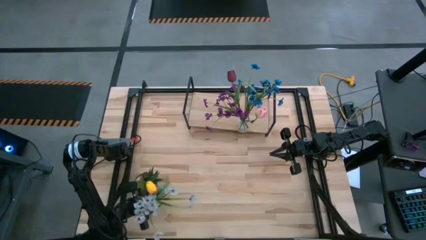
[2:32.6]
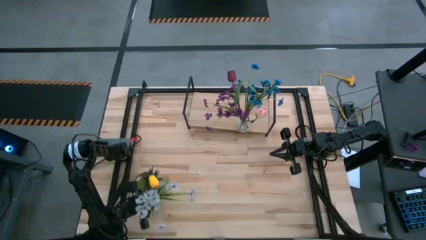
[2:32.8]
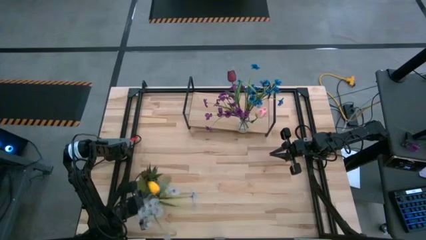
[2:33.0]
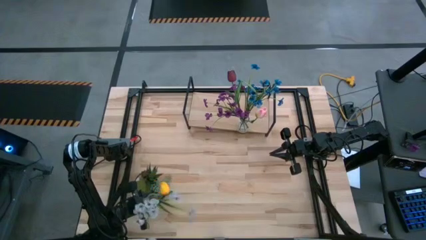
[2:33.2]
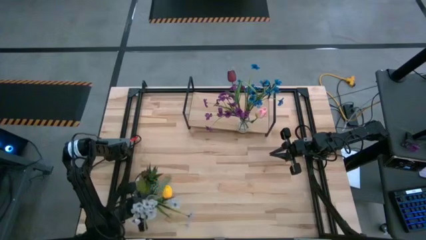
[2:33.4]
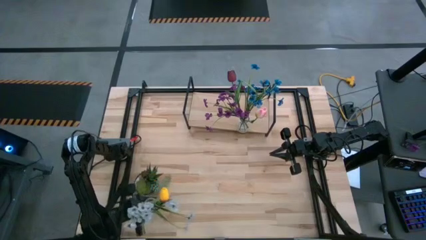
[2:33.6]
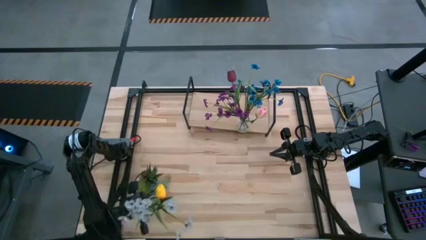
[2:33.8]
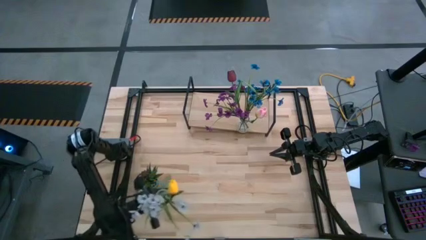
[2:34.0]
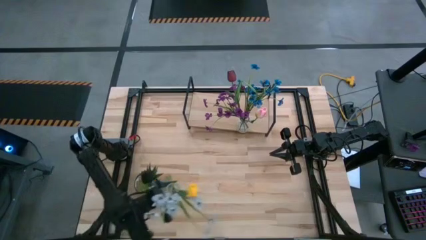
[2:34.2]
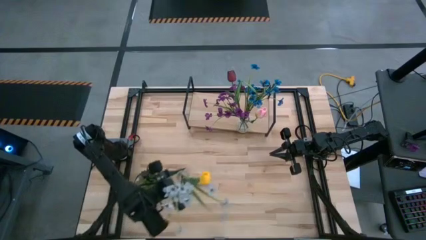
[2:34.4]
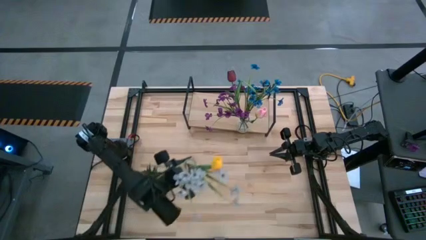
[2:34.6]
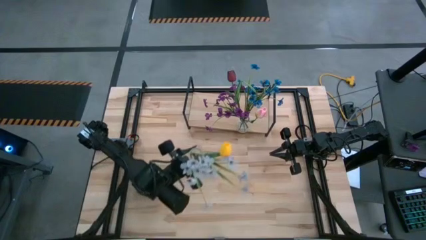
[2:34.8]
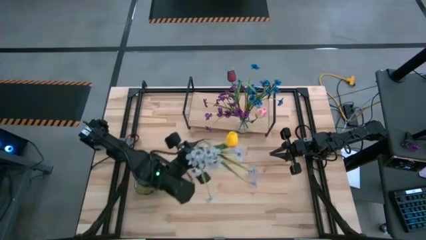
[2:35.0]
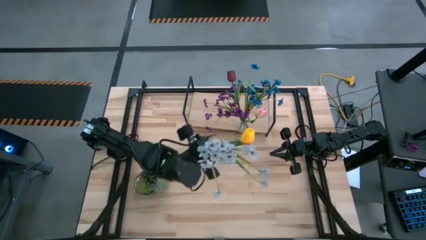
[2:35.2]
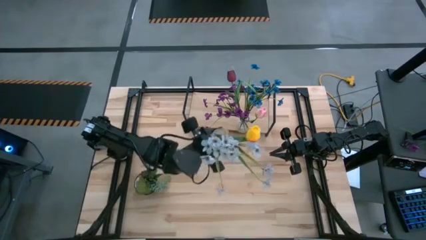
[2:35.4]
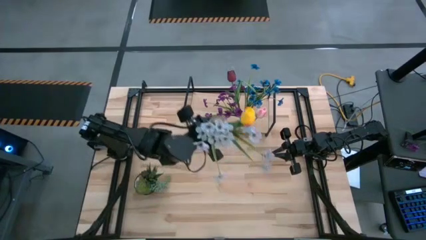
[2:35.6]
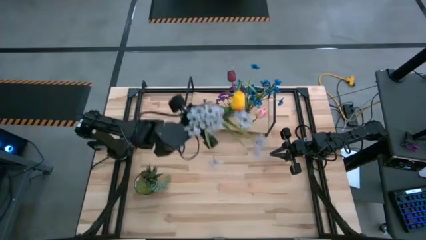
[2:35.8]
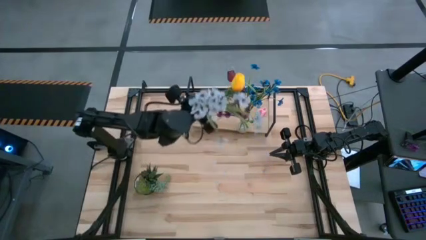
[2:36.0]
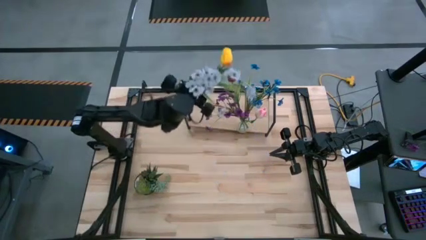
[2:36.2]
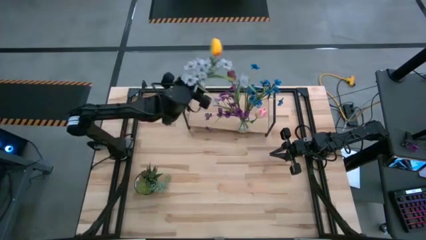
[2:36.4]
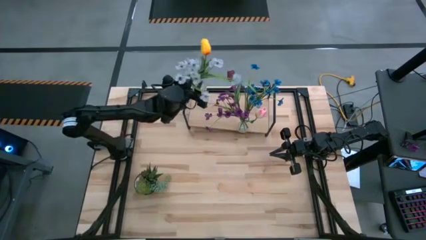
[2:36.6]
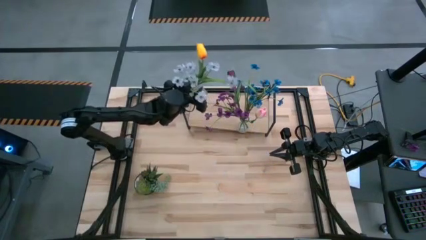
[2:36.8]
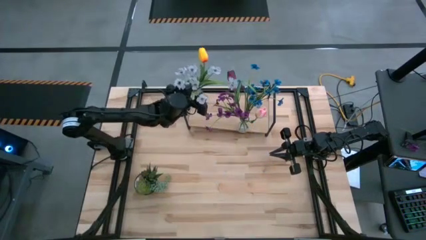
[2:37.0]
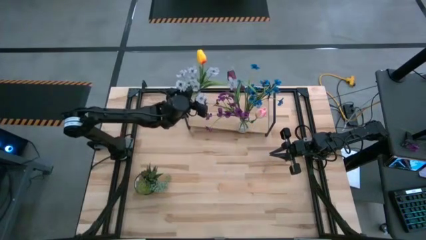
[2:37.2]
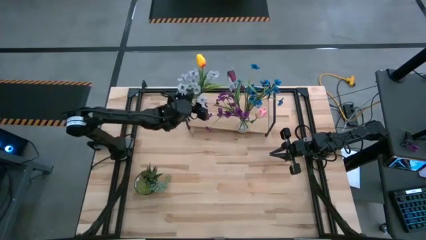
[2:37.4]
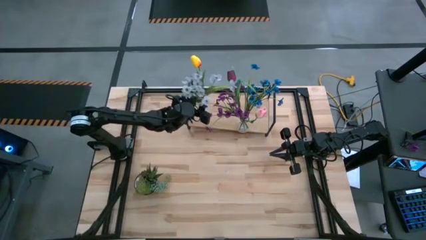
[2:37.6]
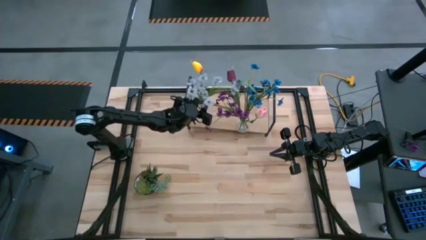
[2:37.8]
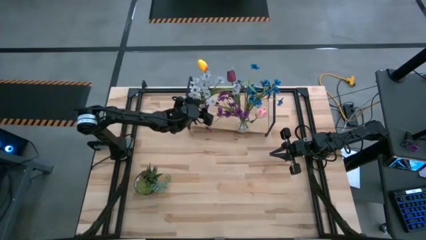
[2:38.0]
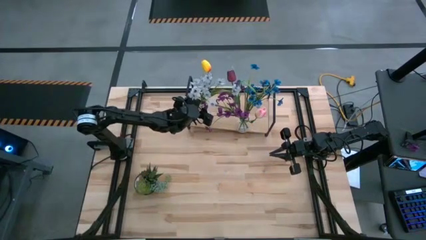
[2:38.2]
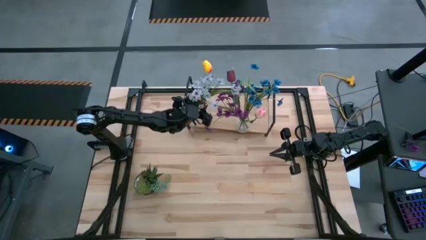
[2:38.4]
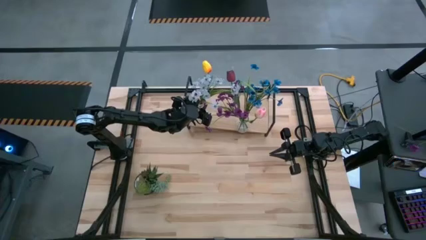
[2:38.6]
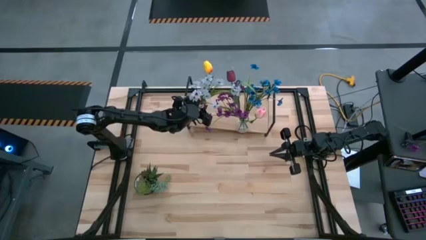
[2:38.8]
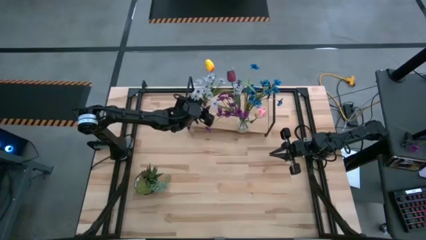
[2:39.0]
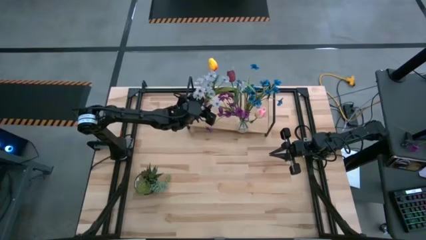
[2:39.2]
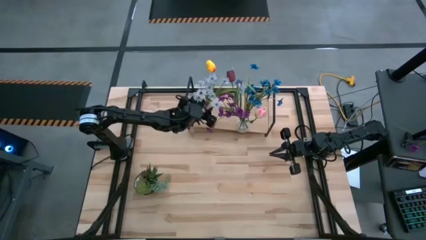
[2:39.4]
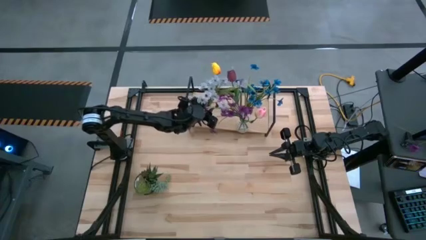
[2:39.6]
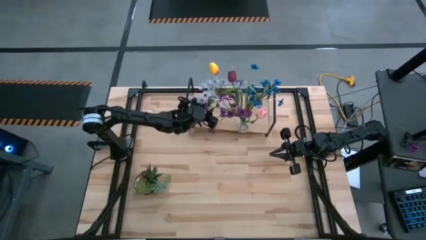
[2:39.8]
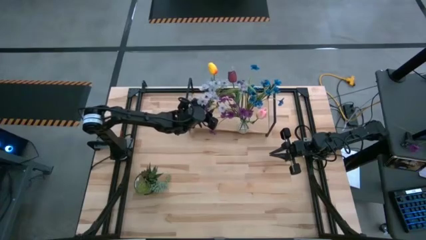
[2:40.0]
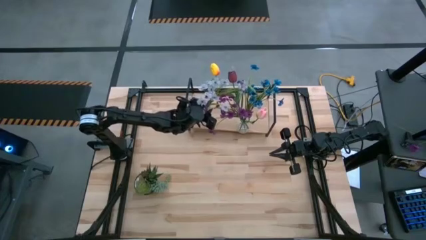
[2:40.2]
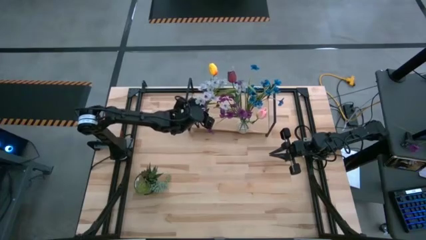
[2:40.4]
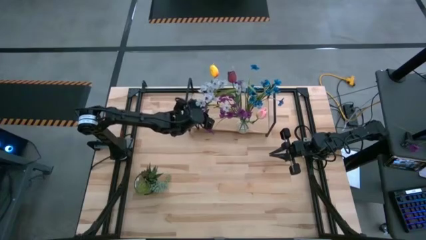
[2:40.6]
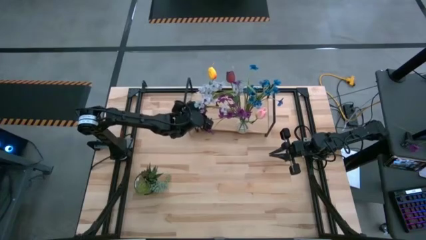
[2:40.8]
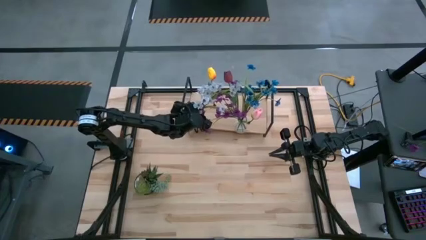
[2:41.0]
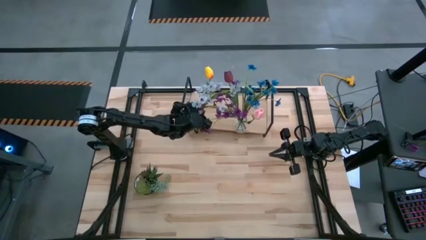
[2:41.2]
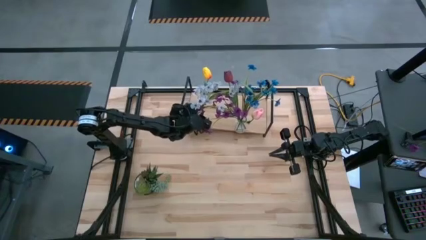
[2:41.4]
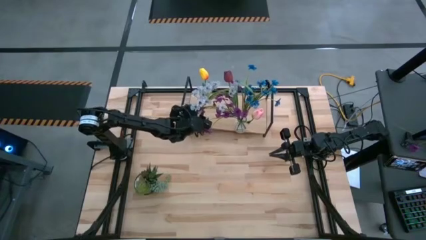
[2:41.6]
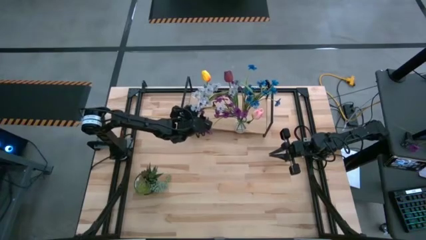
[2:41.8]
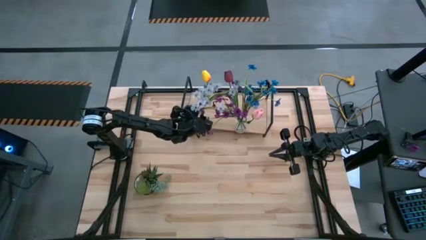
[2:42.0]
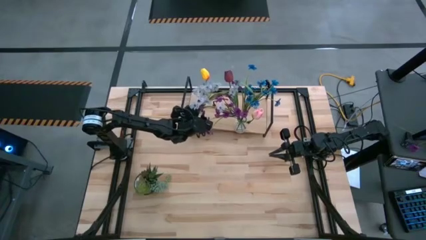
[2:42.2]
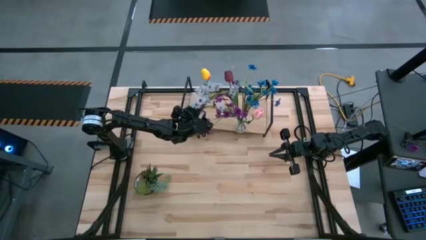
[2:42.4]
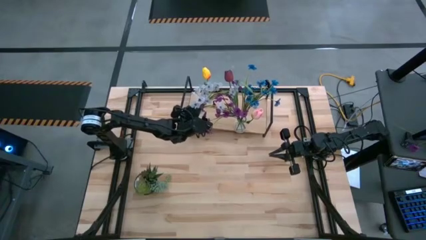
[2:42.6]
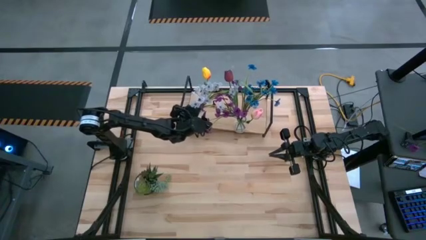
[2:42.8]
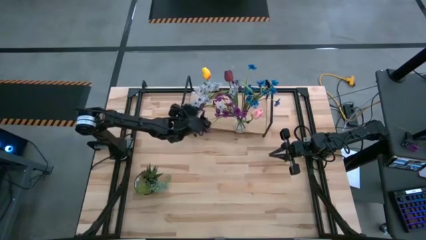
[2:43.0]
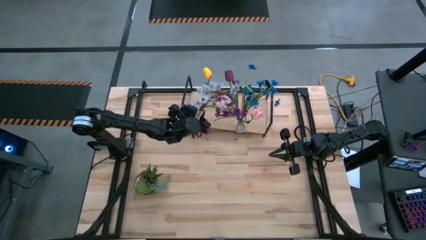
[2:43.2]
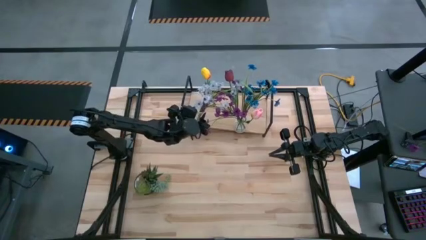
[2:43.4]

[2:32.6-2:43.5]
Task: Pick and place flowers into a vace then onto a shelf
Put the transparent vase on the shelf
